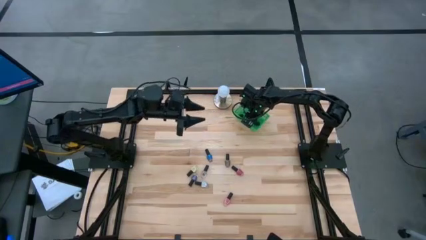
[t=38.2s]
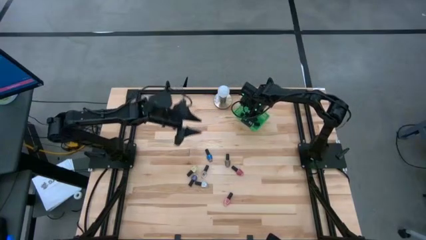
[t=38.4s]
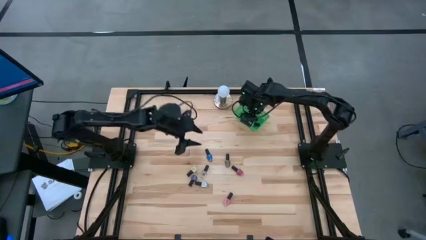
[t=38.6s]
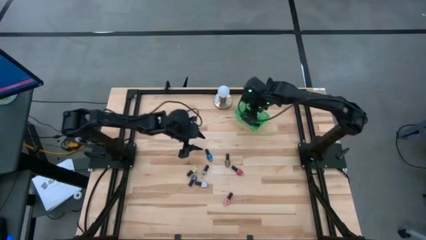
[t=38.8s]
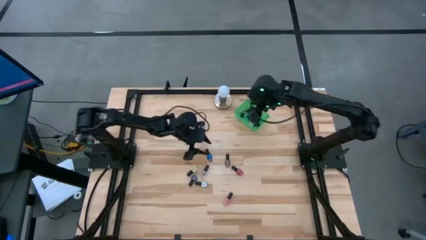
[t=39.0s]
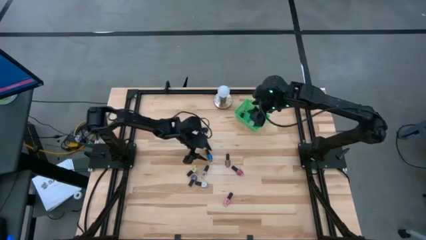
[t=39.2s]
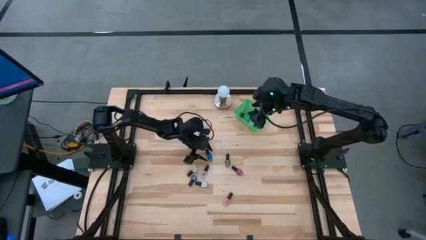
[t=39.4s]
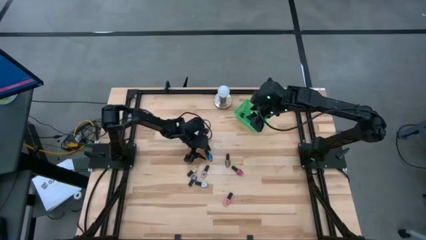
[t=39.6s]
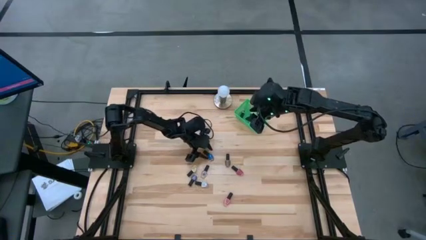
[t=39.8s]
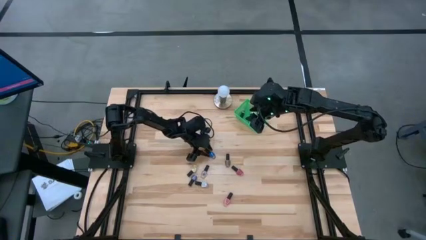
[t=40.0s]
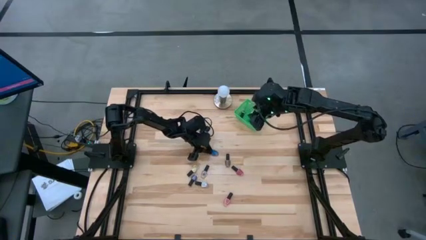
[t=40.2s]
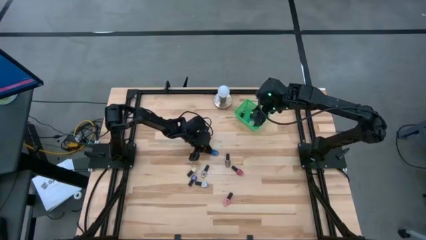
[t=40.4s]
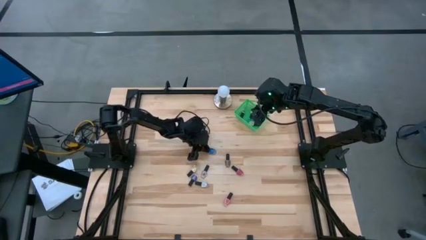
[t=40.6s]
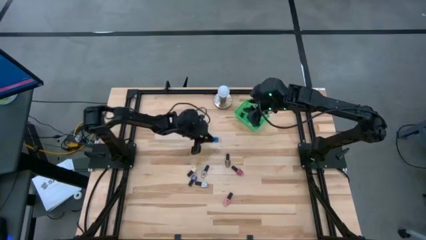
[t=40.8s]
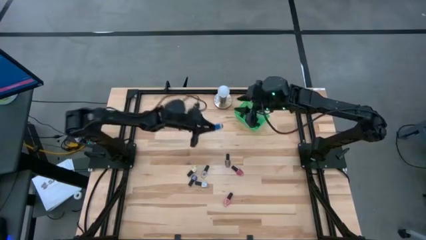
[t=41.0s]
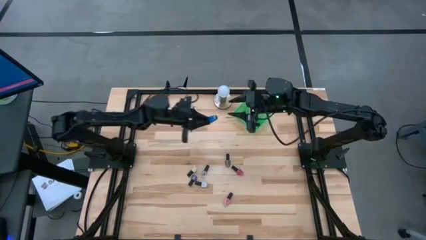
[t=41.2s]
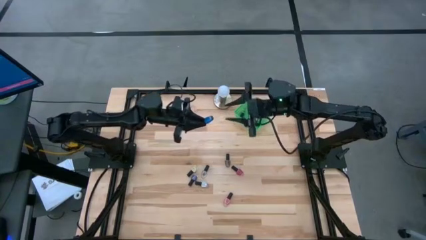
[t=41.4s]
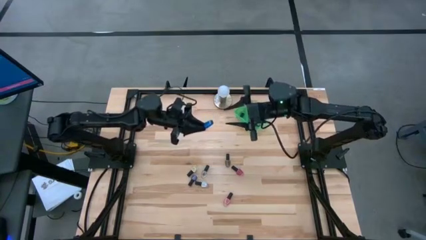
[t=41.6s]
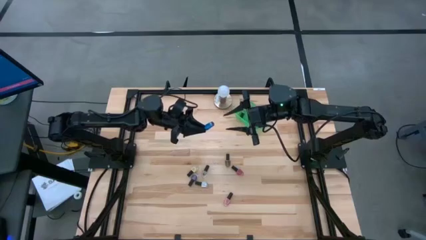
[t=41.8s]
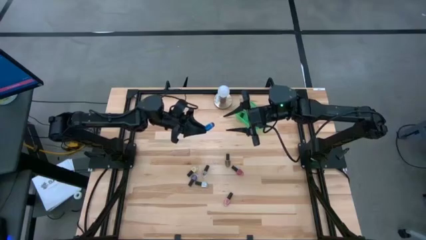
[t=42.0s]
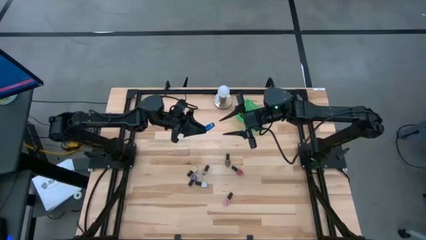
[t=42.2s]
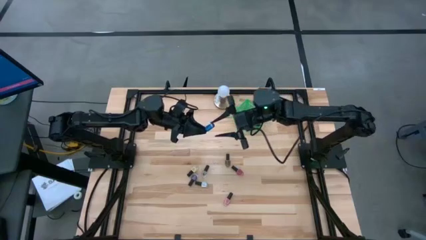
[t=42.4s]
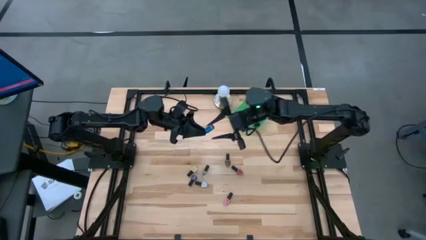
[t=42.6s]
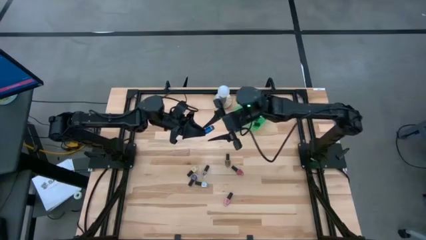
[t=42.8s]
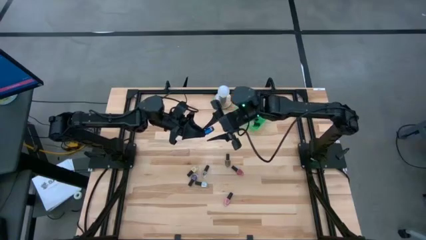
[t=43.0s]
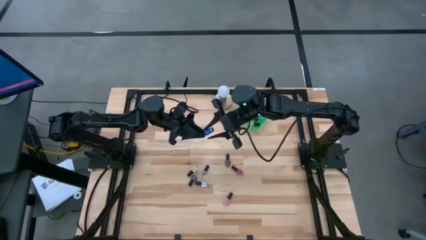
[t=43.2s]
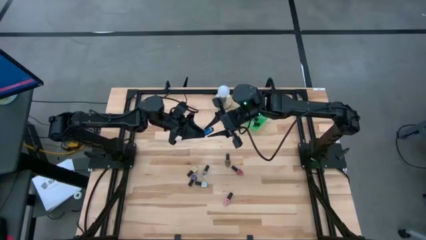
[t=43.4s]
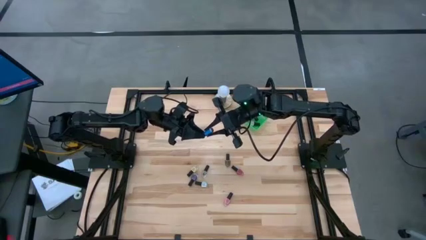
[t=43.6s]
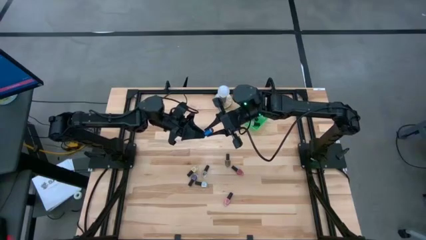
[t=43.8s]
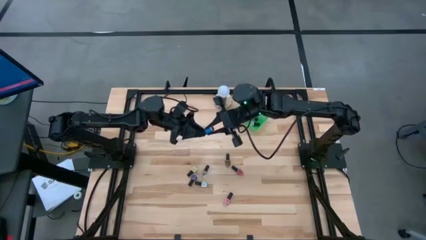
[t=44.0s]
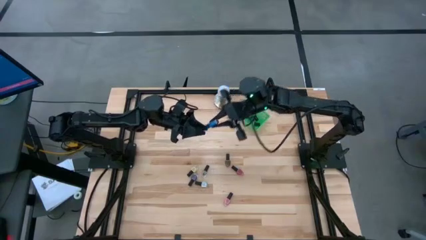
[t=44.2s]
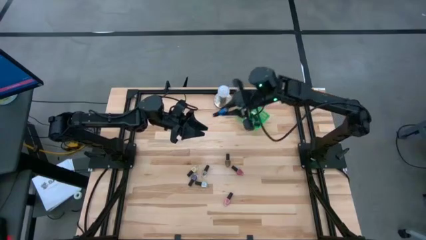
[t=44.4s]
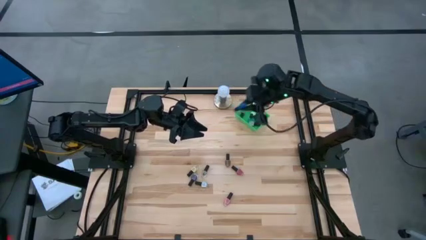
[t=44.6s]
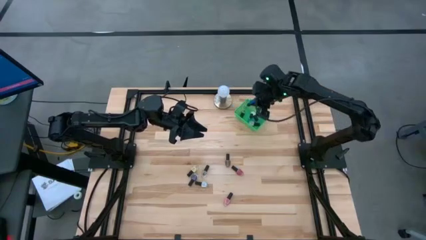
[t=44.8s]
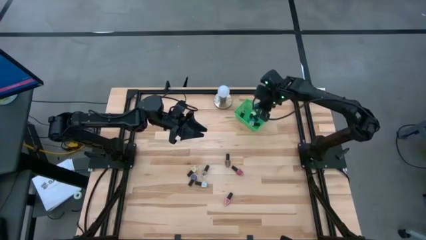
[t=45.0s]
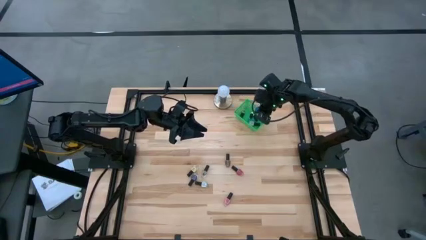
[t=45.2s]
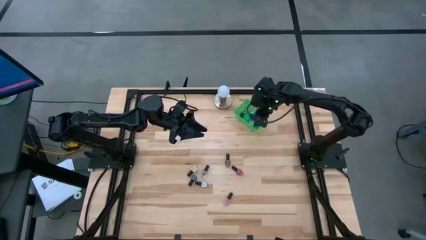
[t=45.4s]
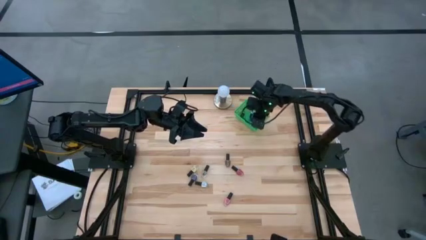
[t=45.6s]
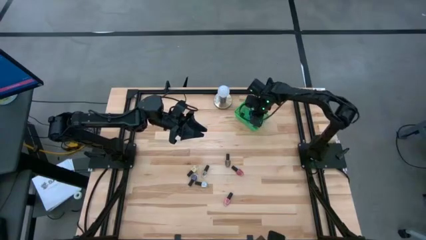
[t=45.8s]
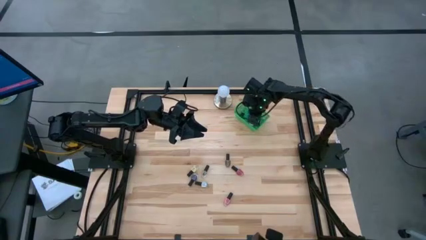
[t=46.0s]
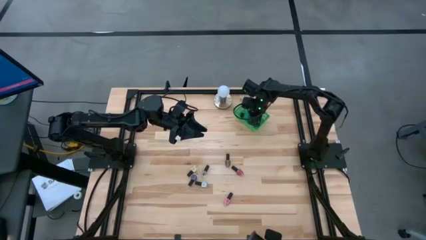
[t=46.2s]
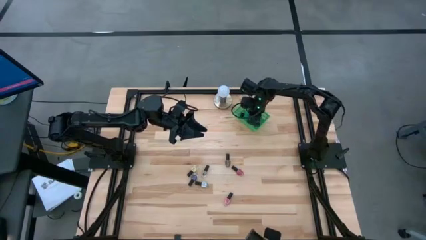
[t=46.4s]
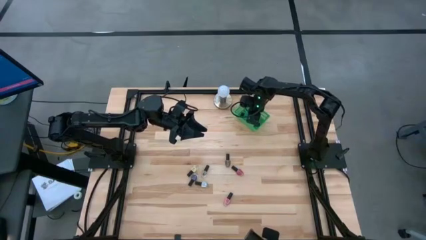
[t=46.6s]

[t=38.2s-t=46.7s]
Task: Pick & Place Nail Polish
Put the blue nail polish bottle into the green bin

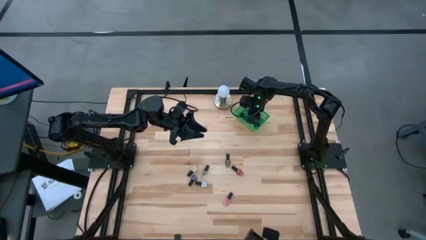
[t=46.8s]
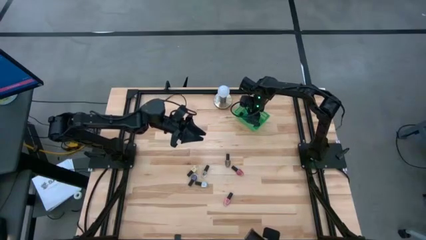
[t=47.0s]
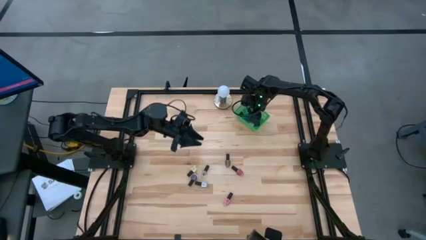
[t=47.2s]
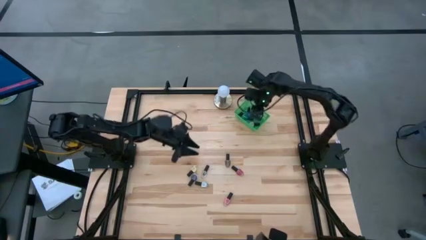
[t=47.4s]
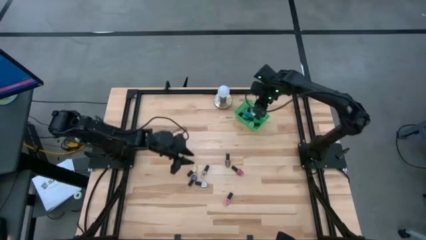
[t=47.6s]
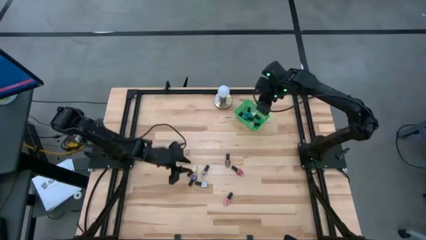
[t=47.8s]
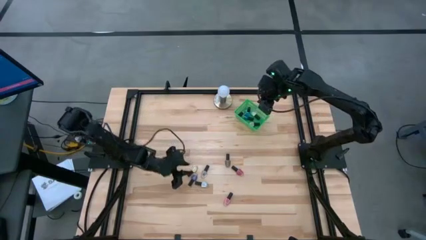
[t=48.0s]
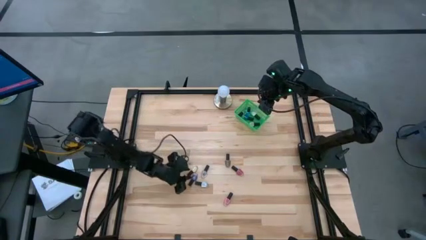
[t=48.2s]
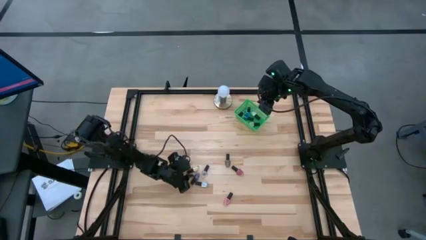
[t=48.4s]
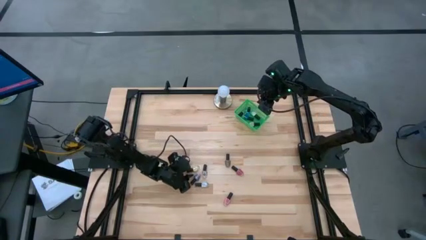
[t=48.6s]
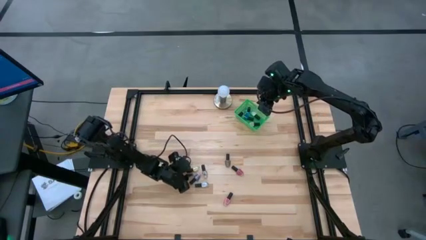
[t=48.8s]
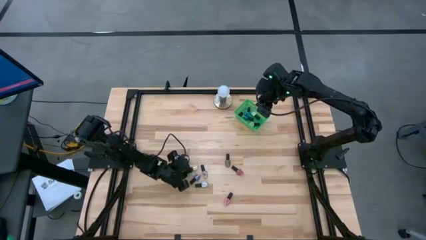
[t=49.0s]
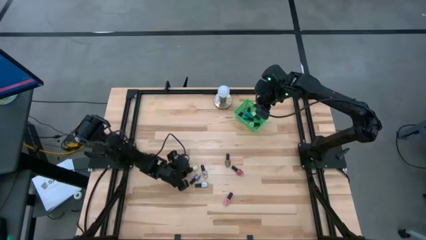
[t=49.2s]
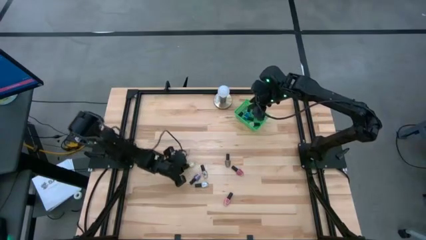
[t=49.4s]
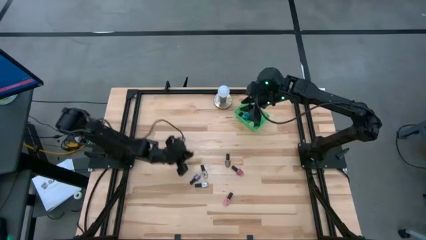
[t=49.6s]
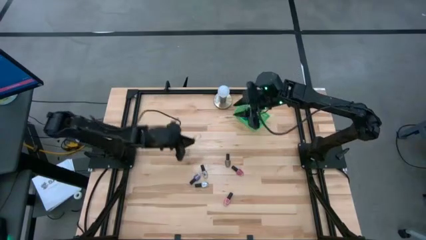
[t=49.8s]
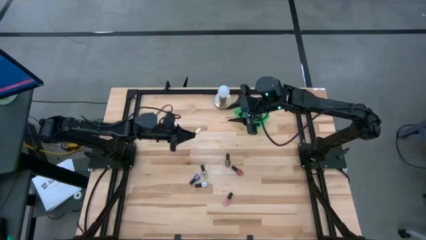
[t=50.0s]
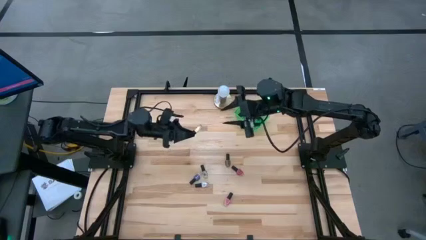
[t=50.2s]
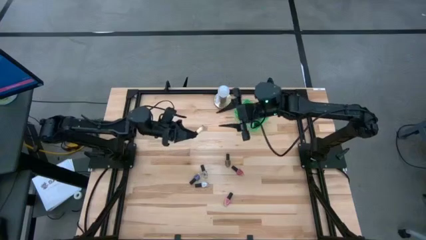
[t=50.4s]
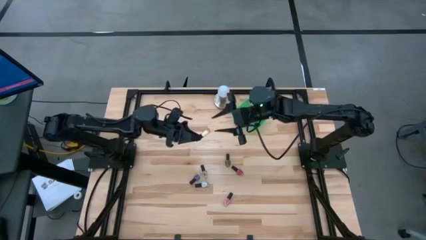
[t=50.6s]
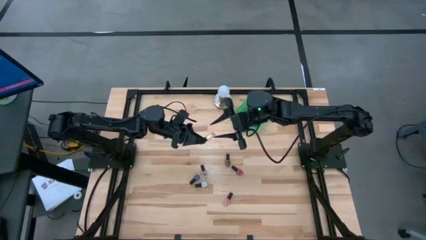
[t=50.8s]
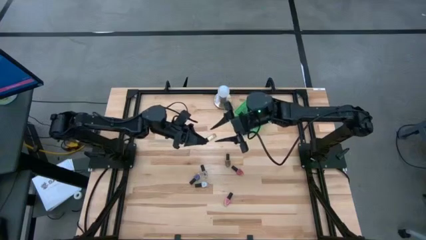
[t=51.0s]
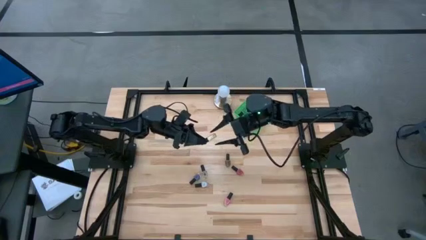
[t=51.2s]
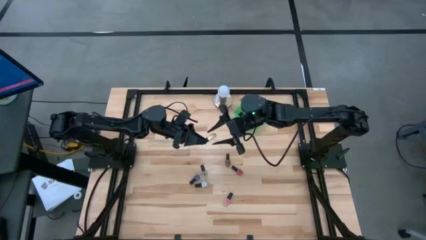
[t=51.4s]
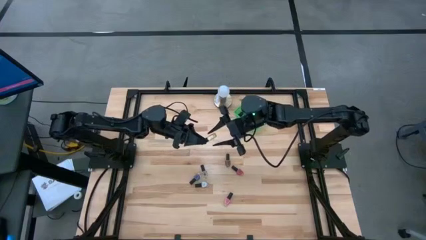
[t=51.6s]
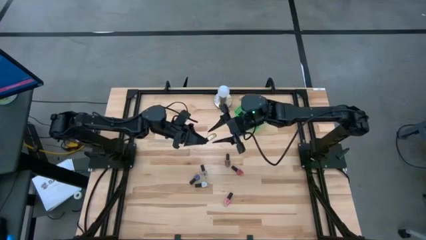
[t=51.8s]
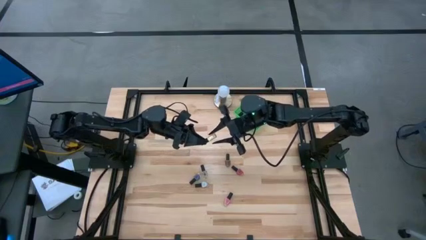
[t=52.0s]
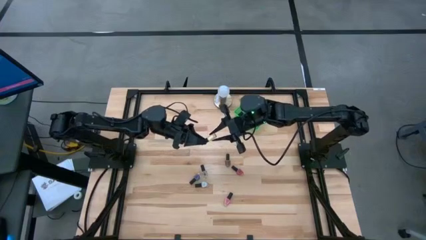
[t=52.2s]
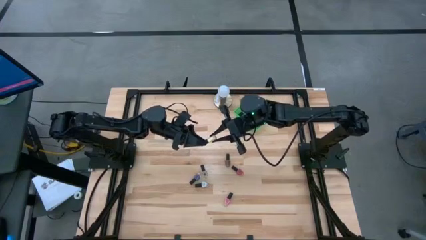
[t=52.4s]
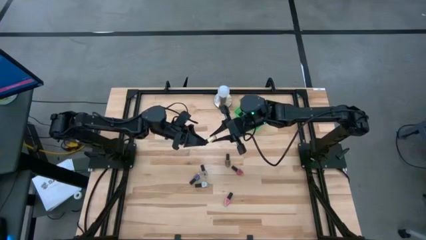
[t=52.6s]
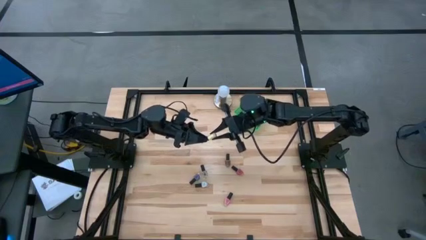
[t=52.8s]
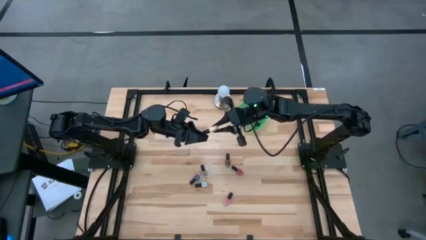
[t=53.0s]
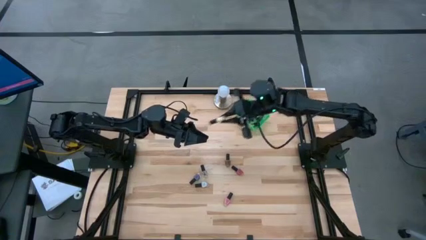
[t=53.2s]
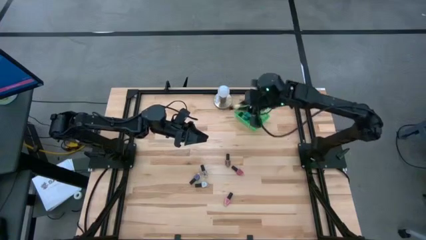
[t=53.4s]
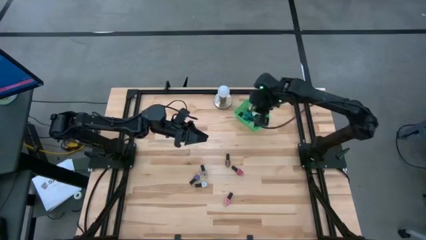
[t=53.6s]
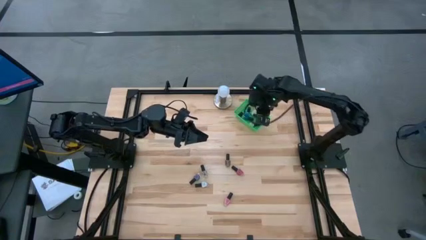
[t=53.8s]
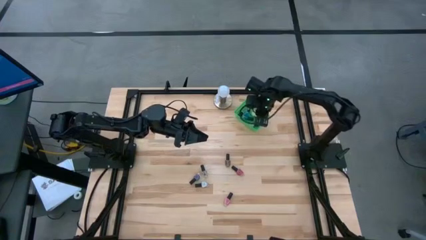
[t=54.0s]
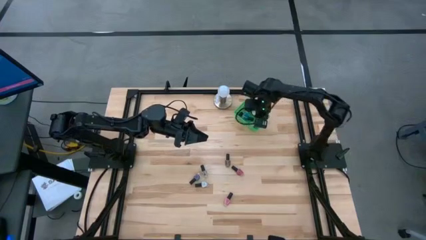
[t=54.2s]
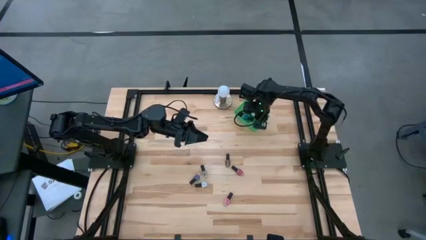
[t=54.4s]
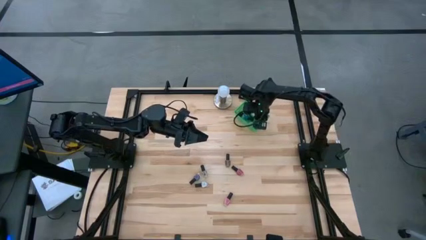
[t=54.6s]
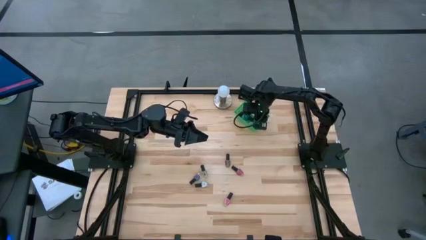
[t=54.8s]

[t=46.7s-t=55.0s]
Put the yellow nail polish bottle into the green bin
